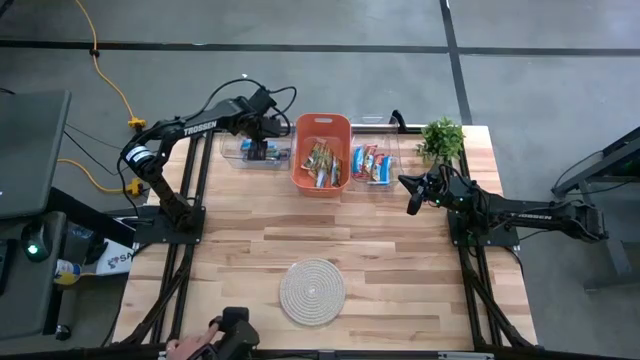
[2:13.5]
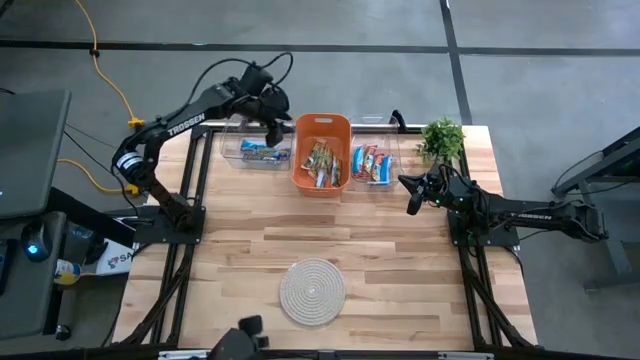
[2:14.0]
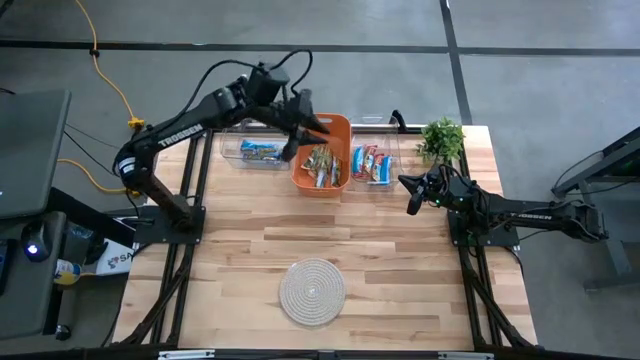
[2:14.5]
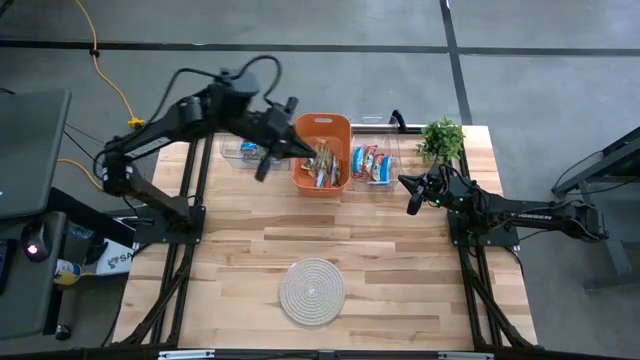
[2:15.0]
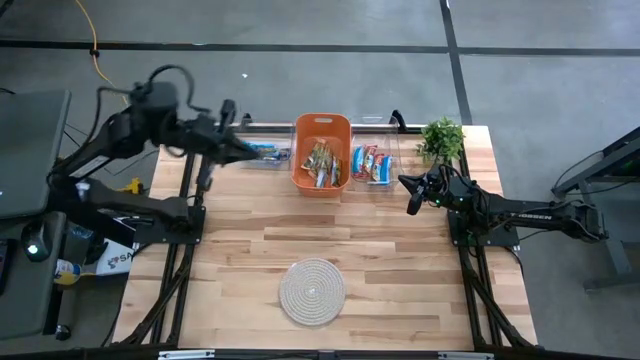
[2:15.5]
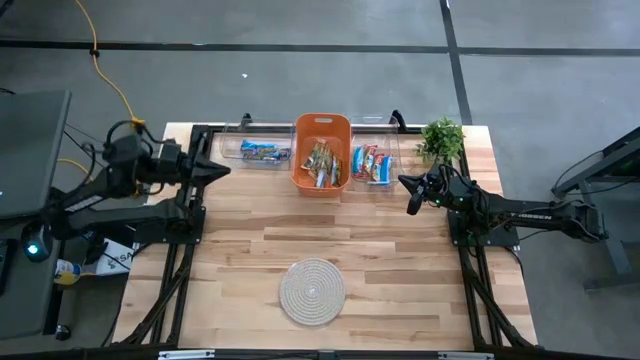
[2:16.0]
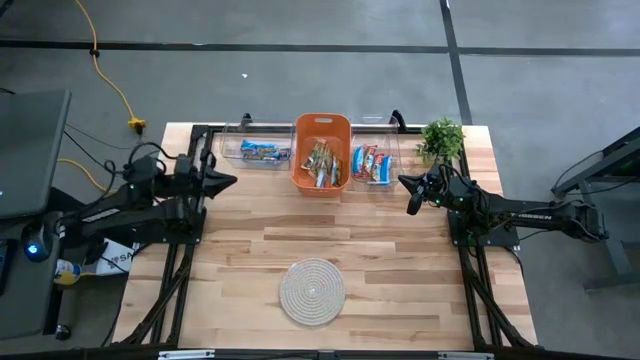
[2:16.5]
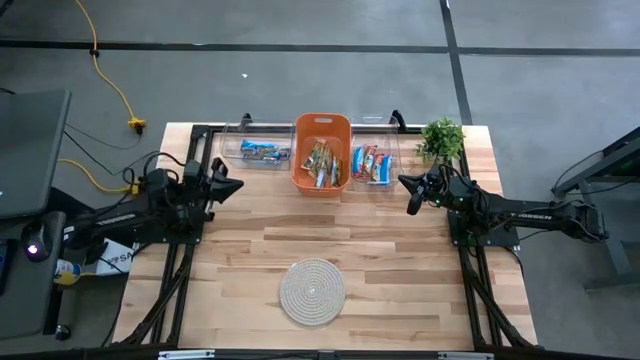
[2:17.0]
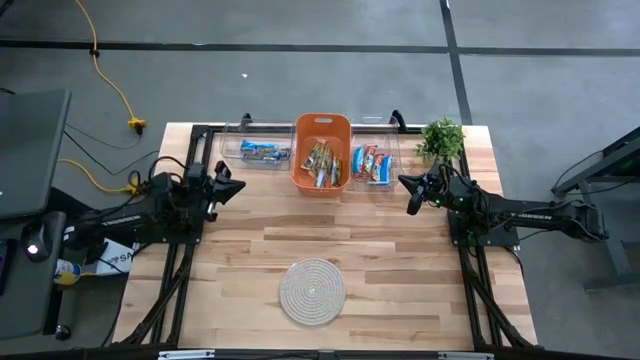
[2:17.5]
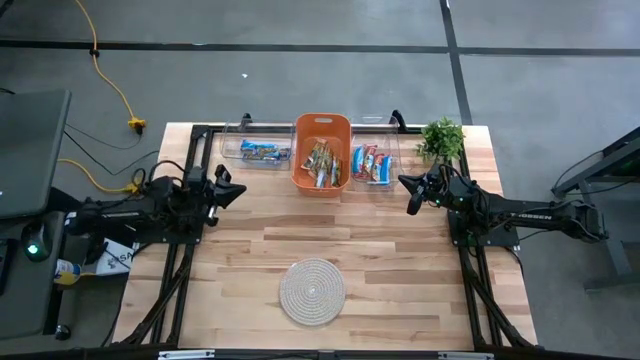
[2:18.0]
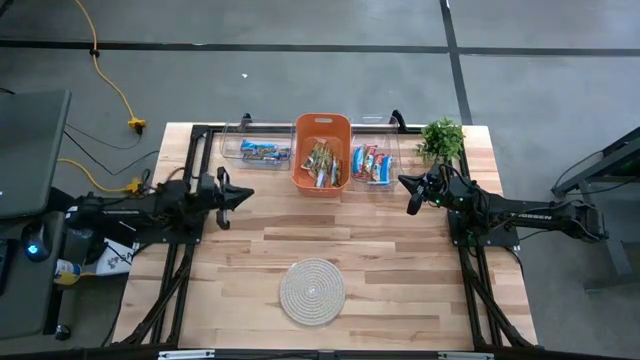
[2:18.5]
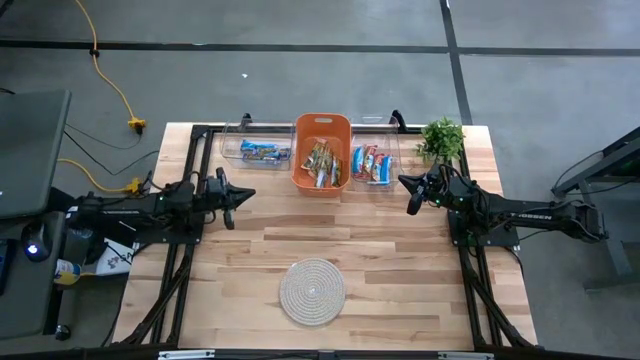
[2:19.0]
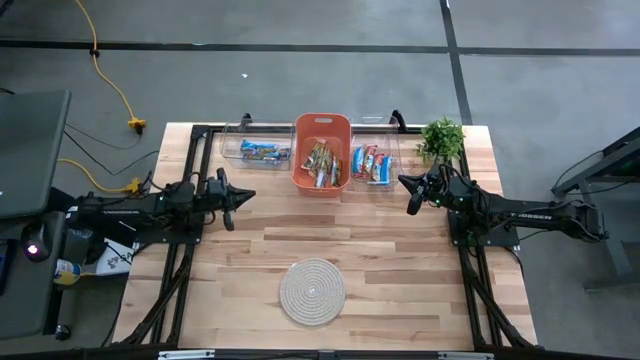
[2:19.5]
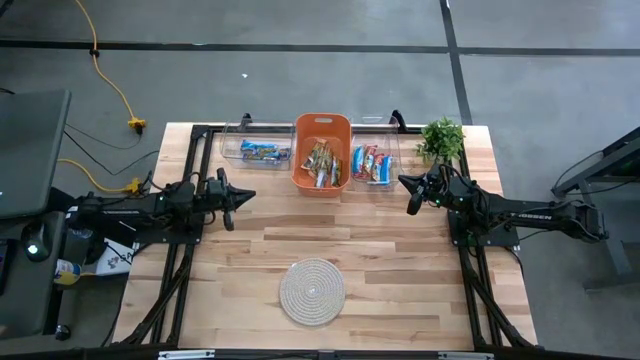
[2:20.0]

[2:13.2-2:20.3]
Task: Pick and place Granola Bars by type
Return to Home Position

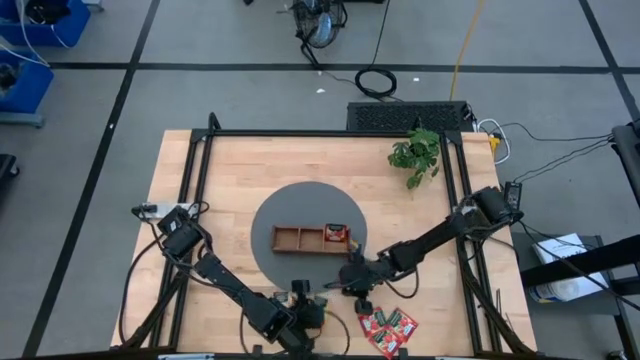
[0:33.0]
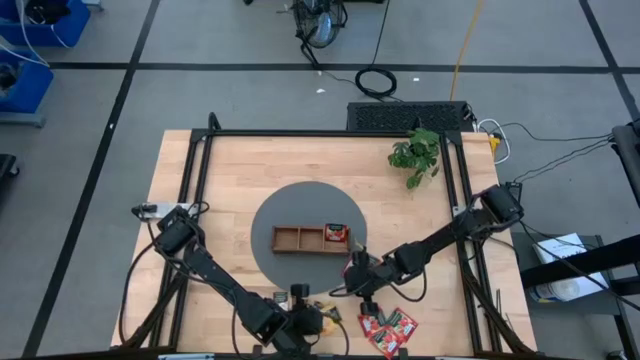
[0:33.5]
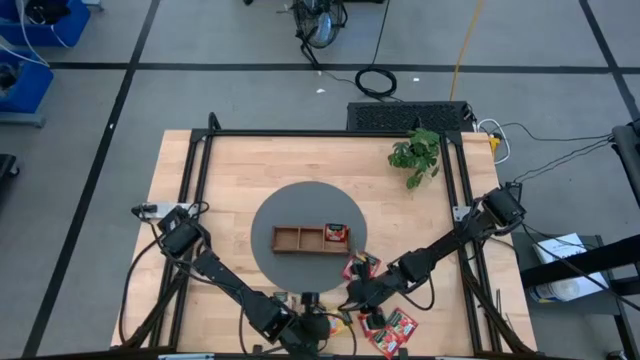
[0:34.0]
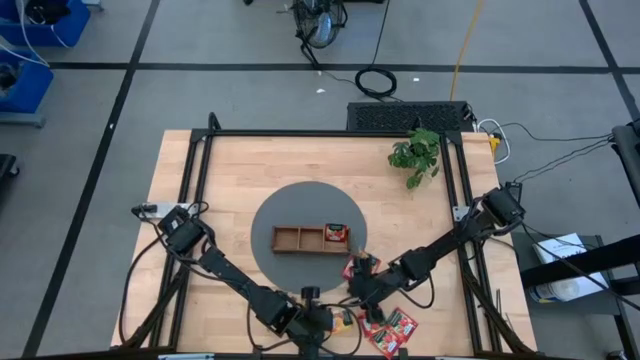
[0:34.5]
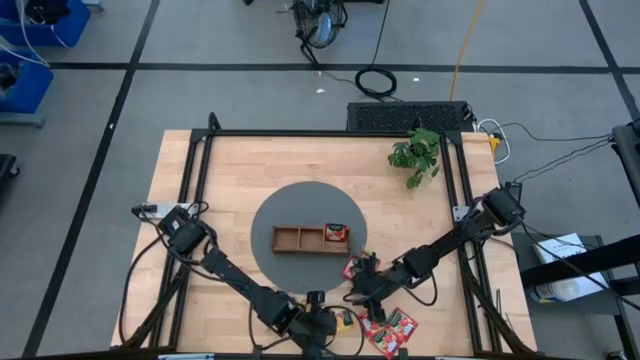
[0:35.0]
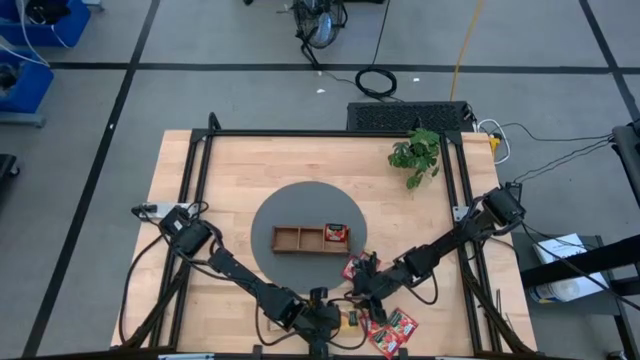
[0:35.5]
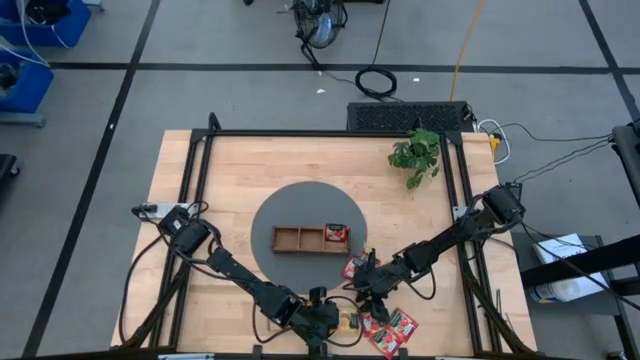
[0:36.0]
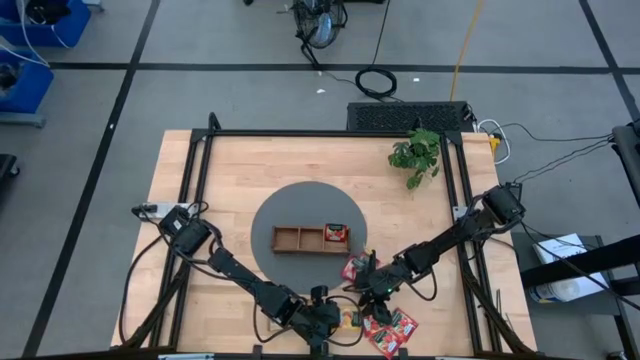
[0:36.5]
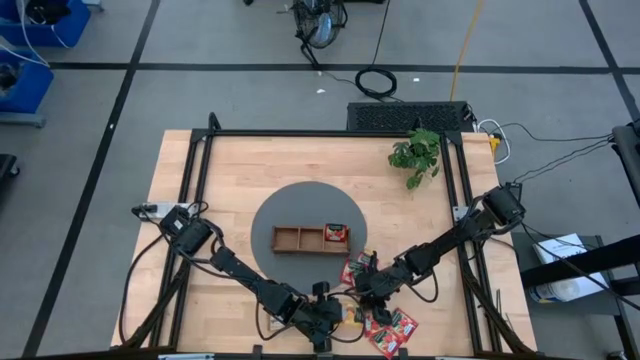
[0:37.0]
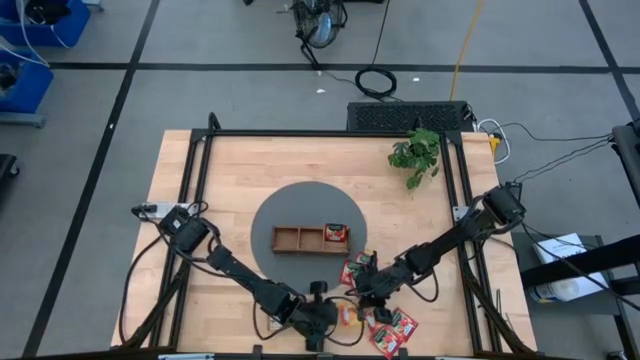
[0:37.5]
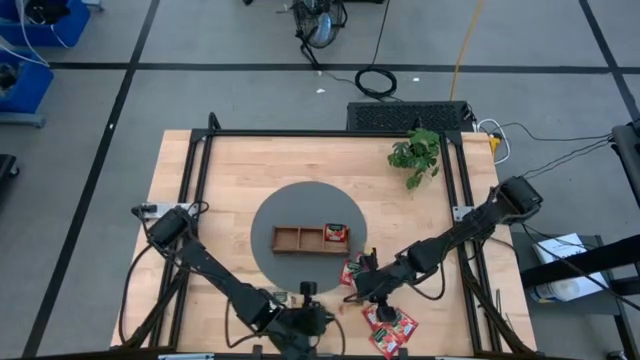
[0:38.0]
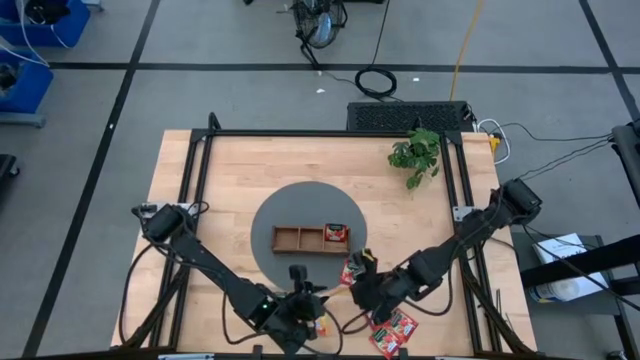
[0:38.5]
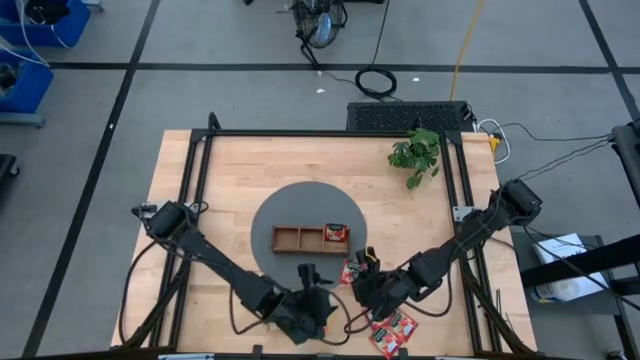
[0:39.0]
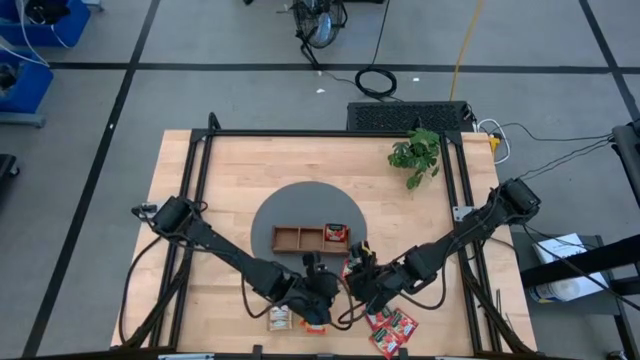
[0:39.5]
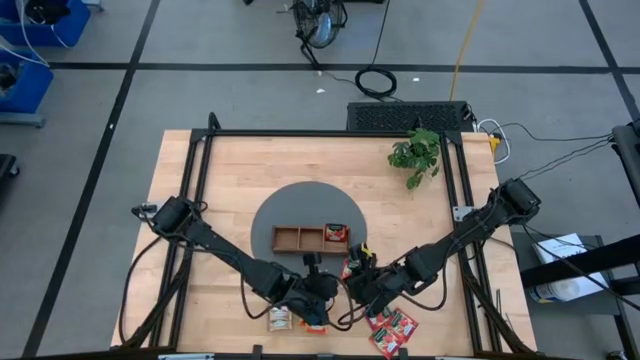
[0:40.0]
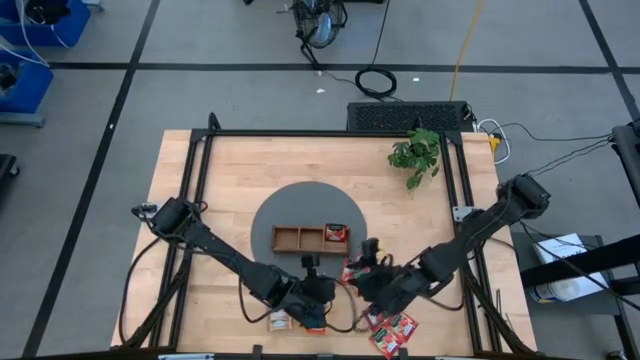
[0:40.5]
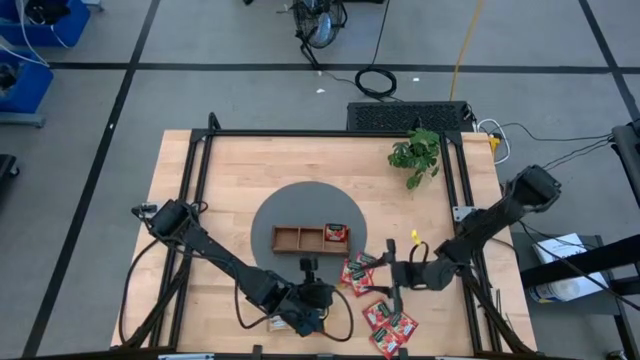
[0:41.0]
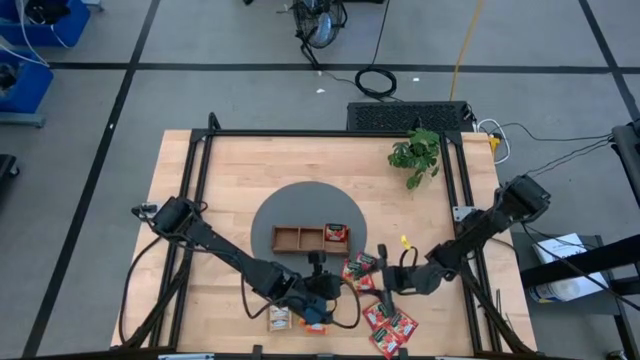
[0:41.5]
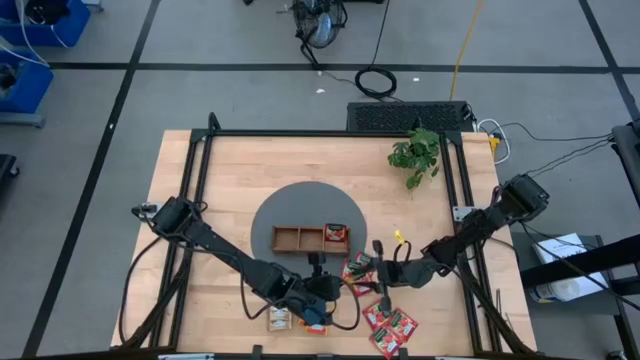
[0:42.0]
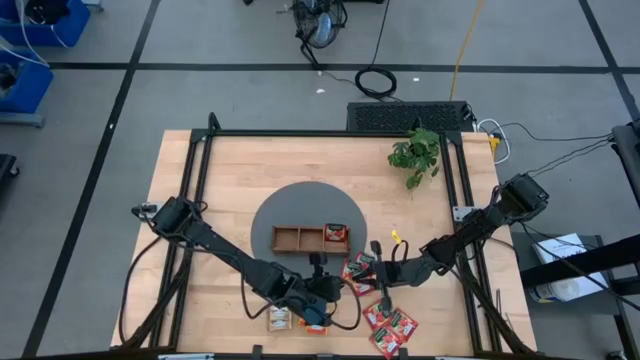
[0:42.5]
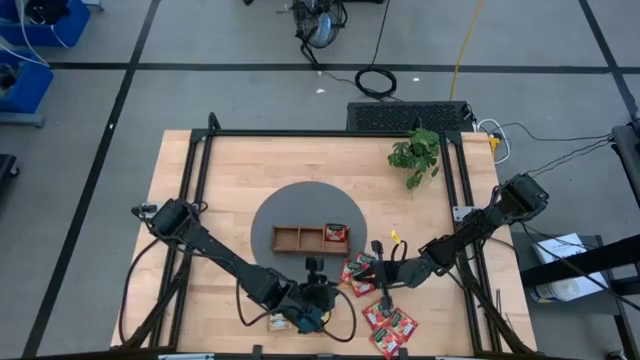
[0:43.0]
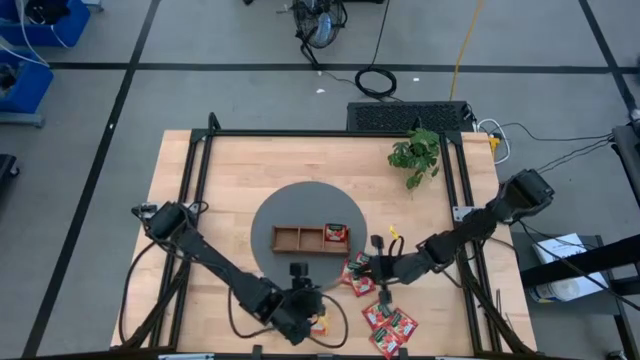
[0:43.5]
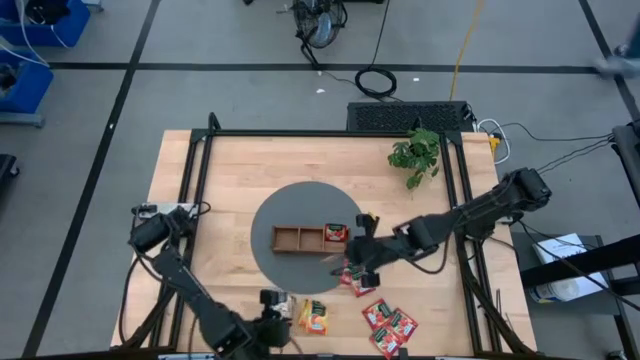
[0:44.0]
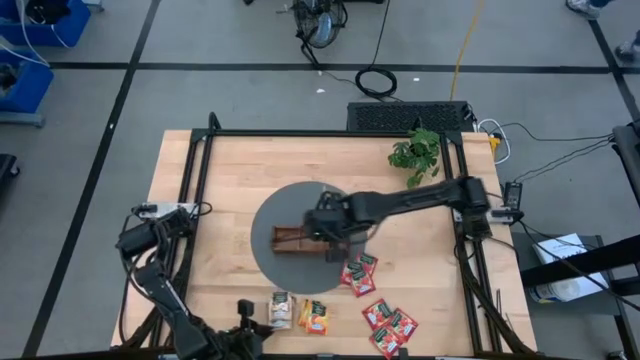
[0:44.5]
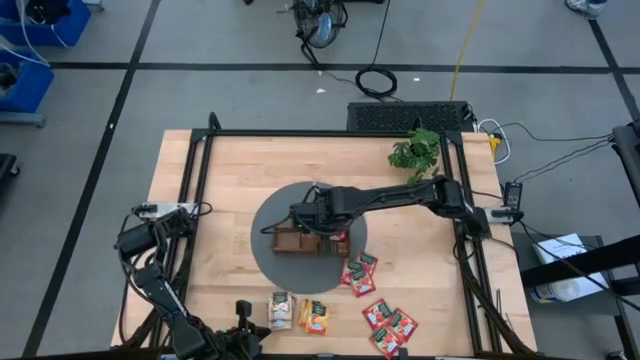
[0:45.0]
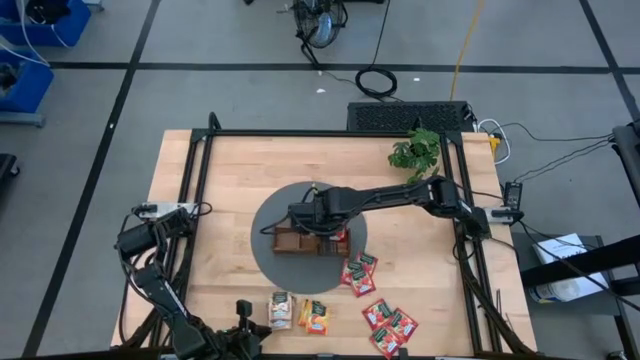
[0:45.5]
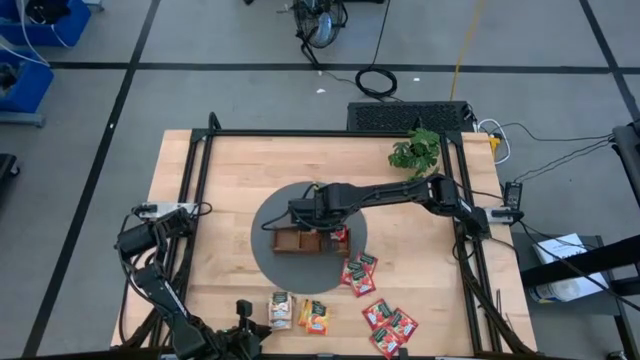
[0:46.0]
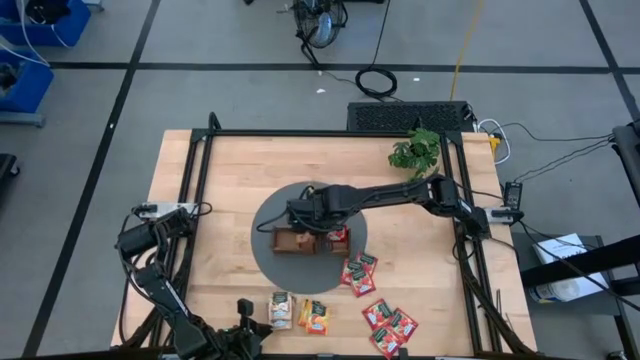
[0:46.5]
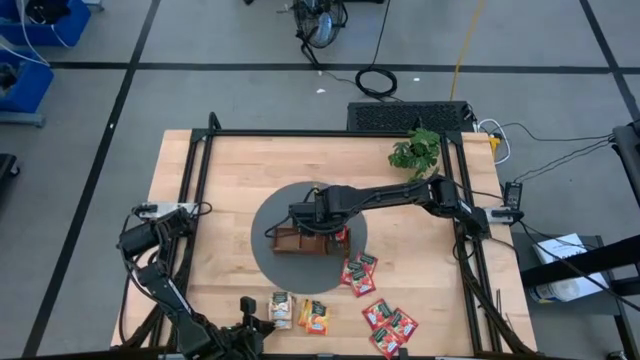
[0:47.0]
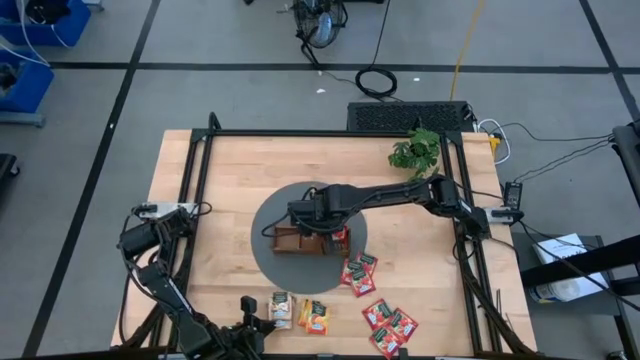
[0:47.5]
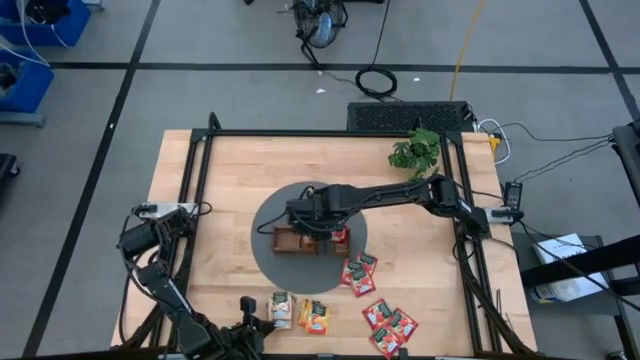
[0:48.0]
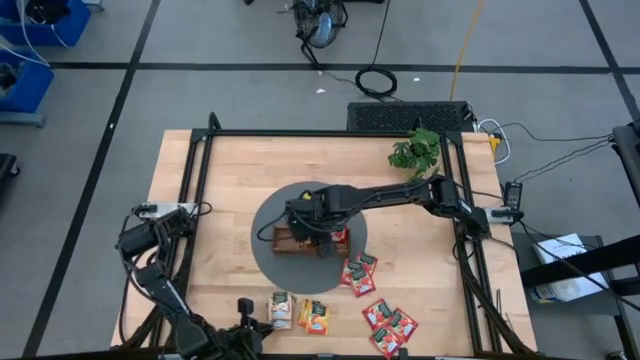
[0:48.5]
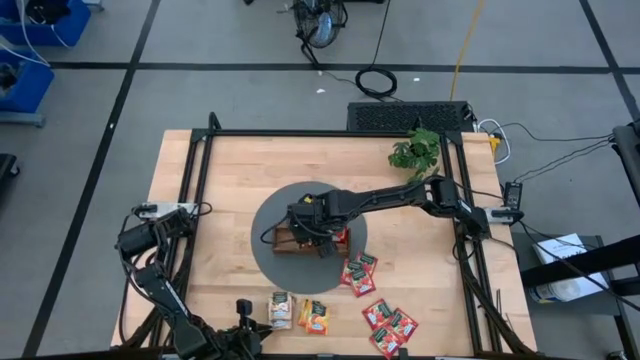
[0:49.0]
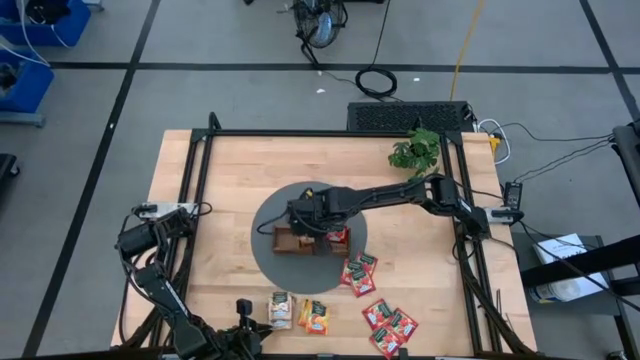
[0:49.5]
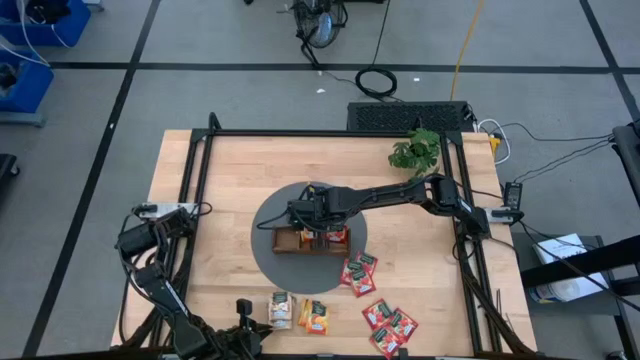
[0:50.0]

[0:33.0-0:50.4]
Task: Pick & Place Tea
Put the yellow tea sachet into the middle section of the wooden organizer
